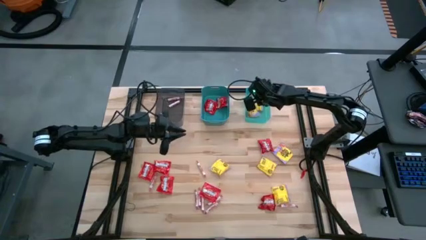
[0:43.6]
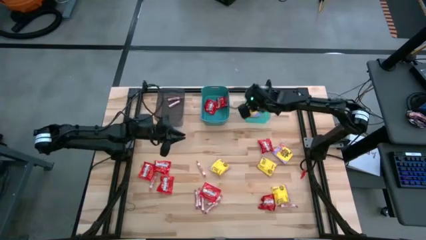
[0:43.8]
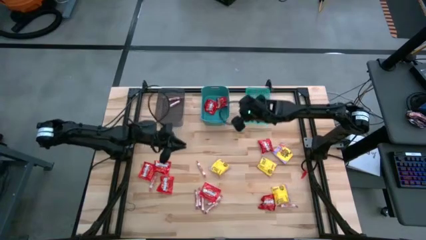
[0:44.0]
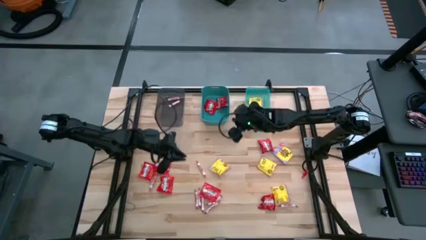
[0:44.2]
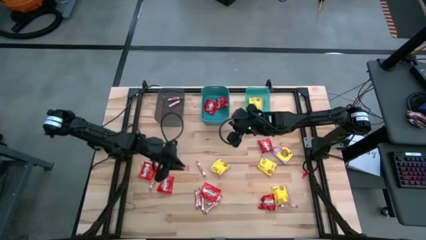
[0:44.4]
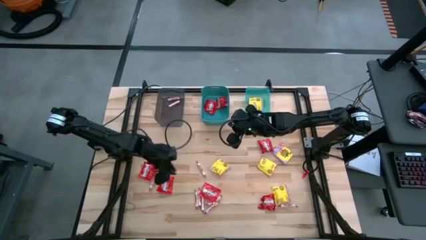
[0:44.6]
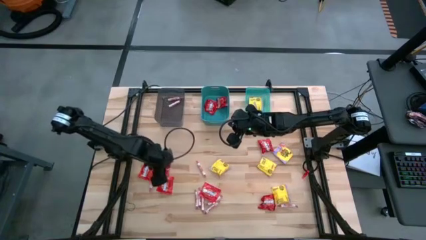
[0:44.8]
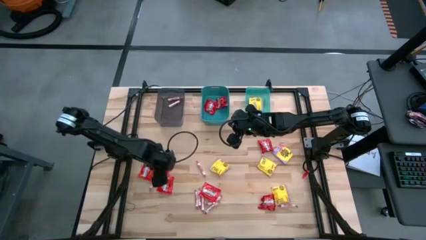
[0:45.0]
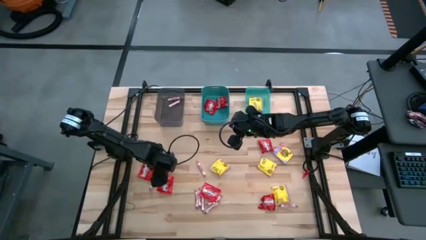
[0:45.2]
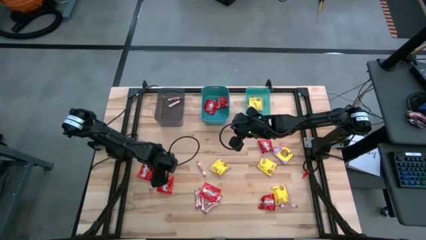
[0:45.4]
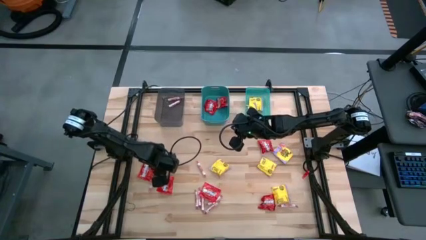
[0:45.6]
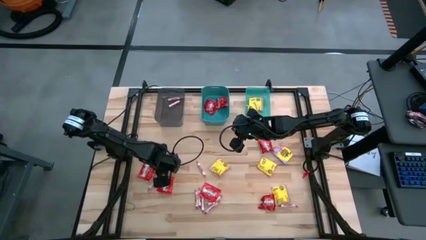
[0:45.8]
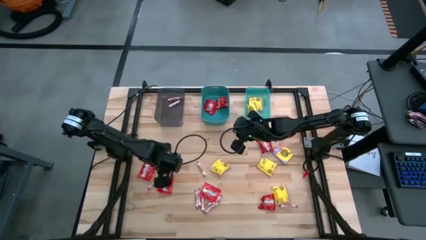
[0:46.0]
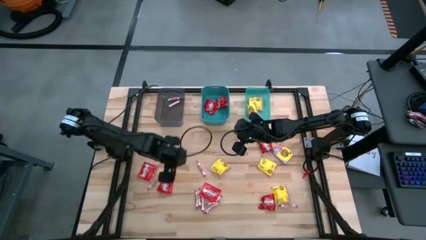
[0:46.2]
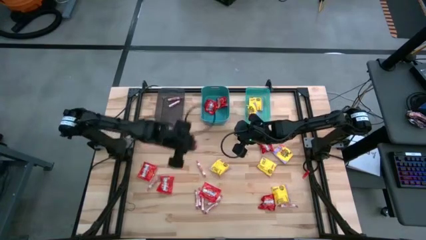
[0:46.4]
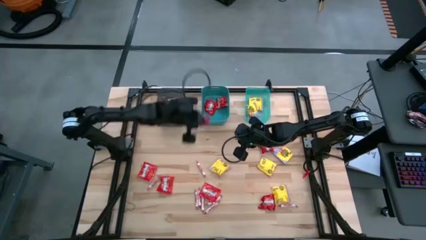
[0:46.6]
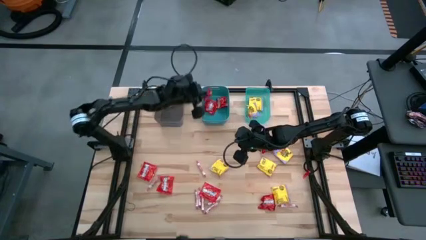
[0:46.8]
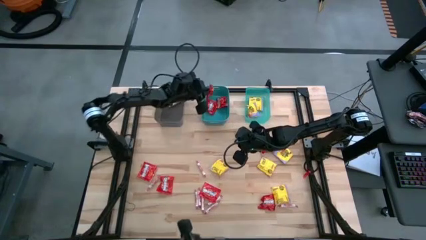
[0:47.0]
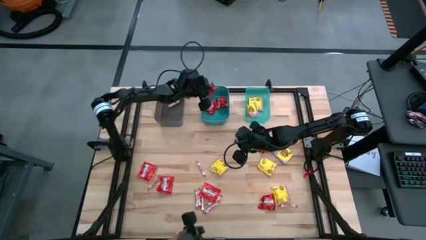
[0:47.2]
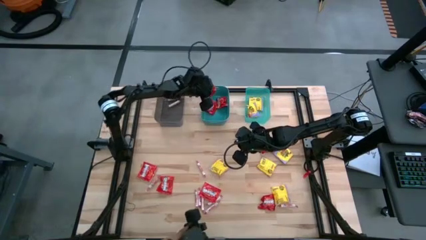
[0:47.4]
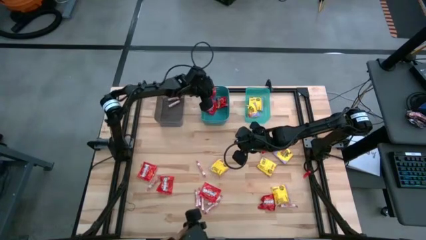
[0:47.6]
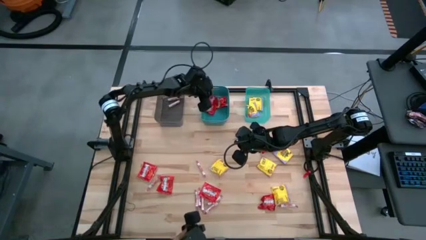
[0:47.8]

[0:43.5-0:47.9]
Task: Sort candy
Put the top left red candy on the dark green bin

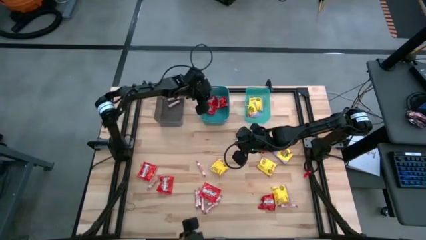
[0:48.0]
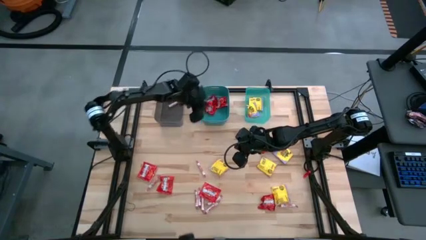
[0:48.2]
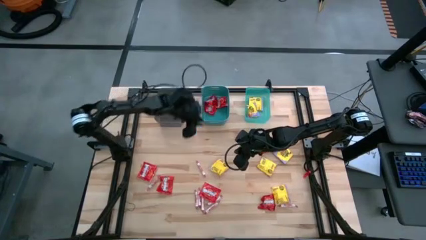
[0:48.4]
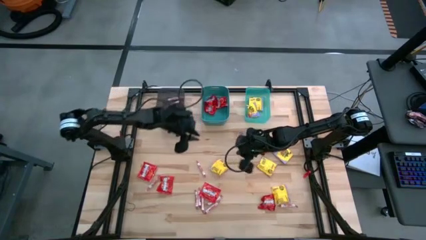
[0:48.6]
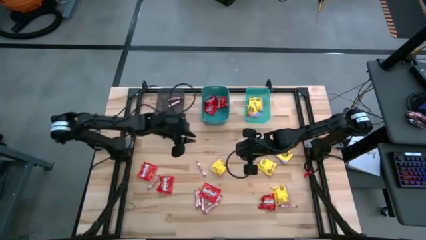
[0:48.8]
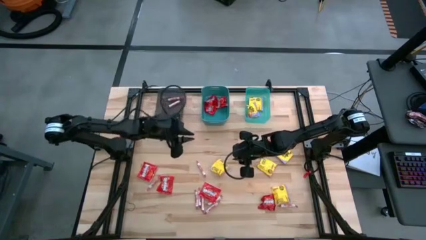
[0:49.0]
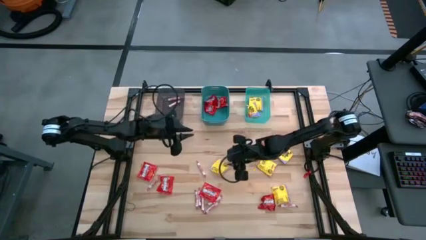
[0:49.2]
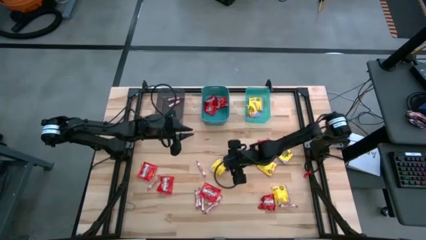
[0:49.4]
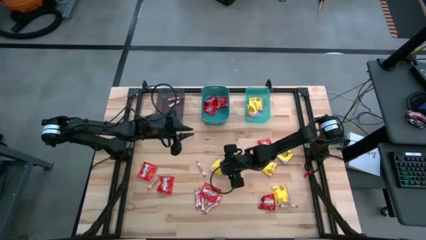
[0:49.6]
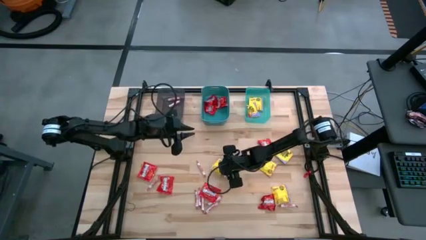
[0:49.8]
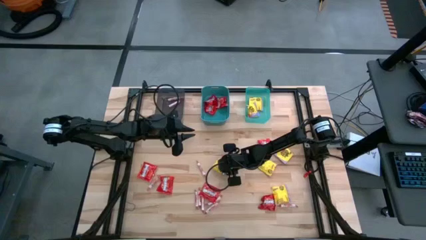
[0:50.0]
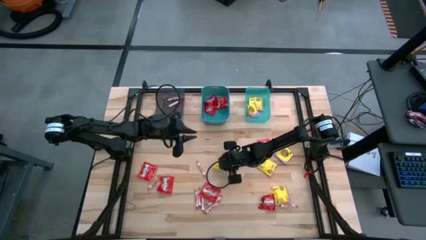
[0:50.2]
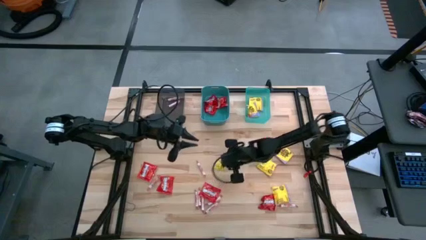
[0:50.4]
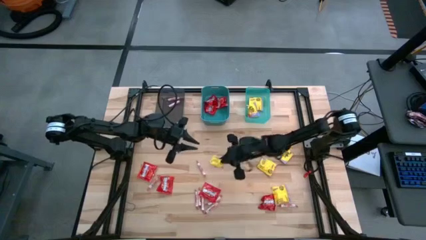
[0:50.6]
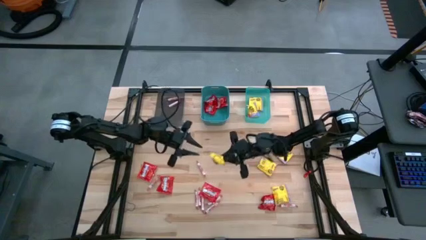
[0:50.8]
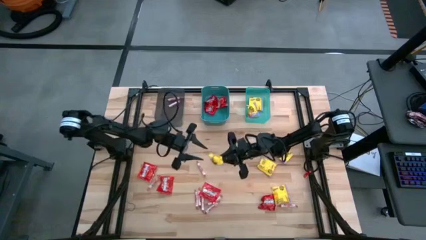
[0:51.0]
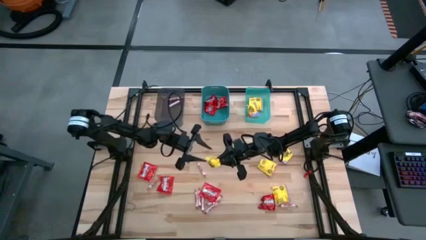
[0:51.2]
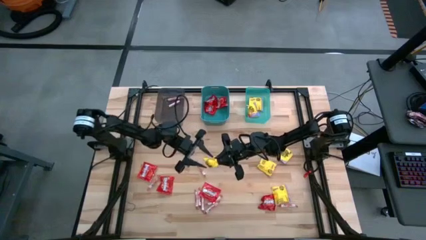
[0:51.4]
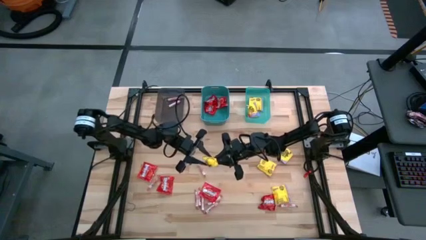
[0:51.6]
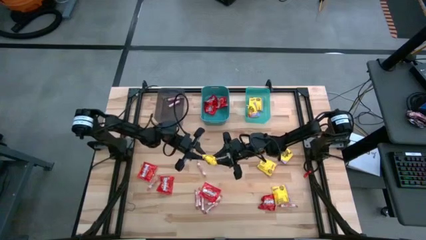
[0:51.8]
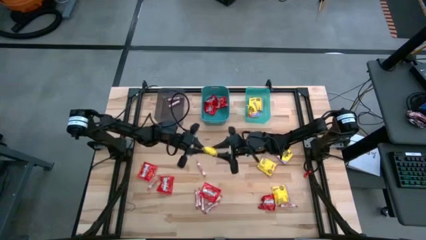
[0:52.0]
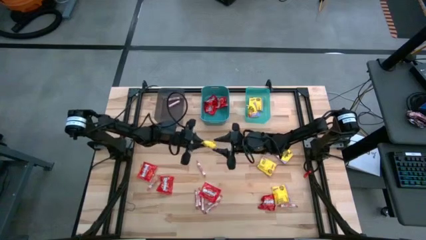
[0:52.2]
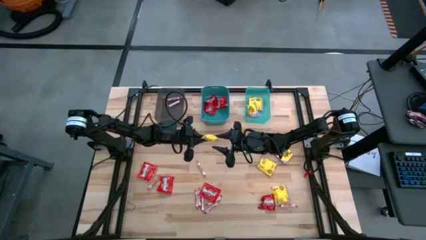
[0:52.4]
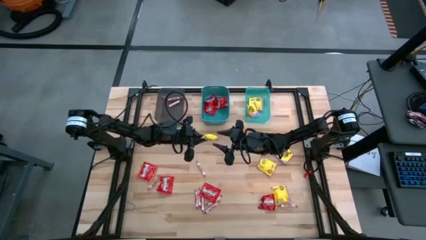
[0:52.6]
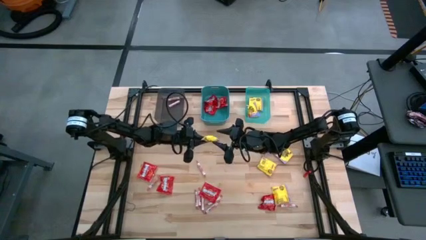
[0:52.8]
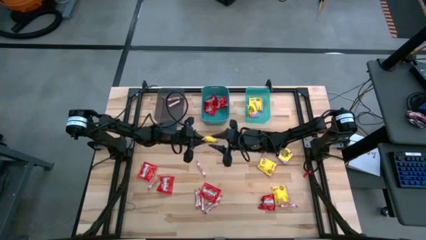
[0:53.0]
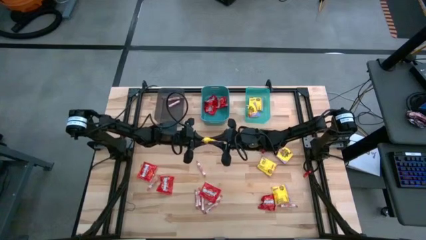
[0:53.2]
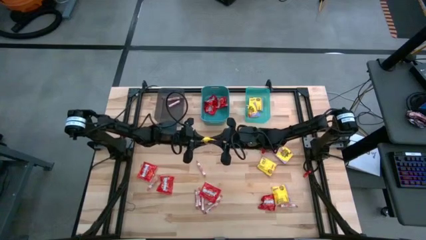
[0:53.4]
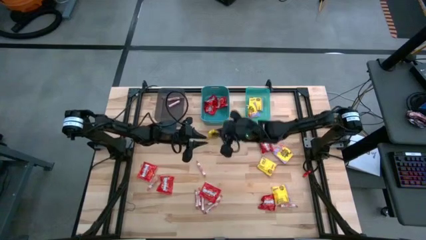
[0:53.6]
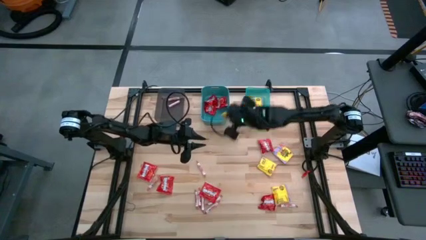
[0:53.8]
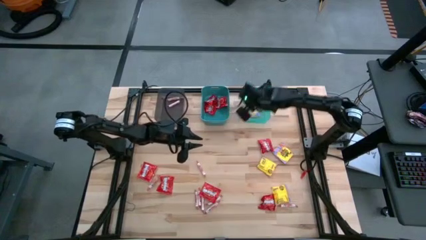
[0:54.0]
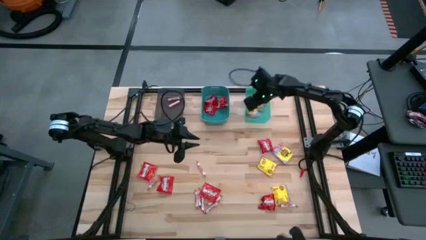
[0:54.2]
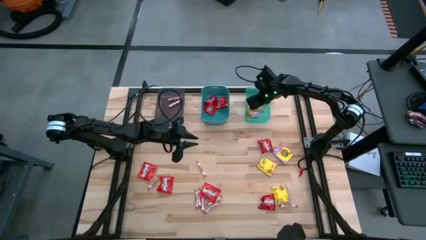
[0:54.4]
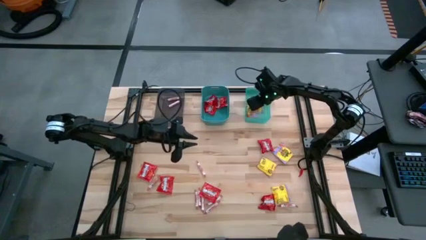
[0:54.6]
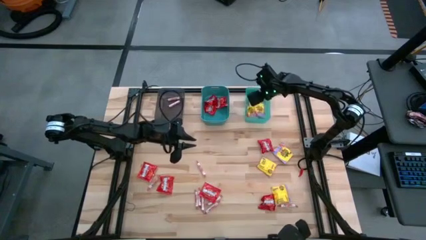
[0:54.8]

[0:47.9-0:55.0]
Put the yellow candy on the light green bin

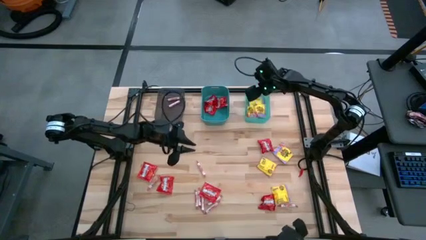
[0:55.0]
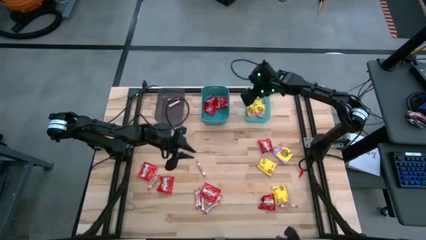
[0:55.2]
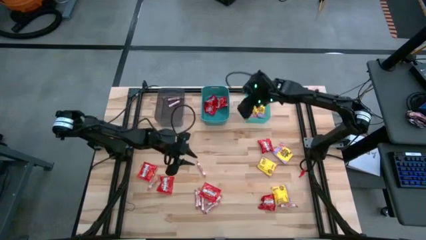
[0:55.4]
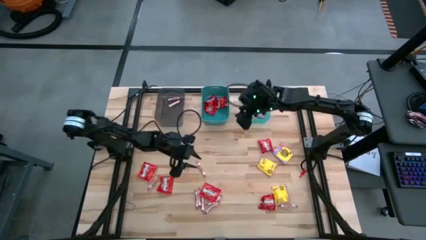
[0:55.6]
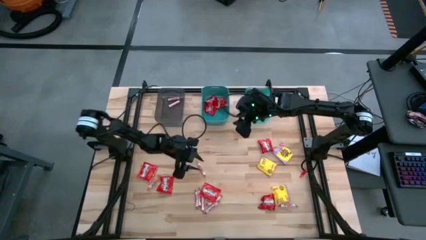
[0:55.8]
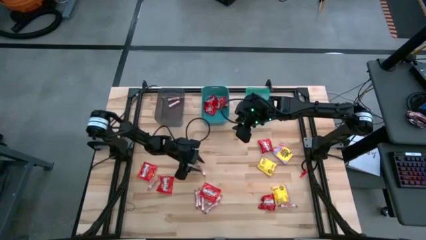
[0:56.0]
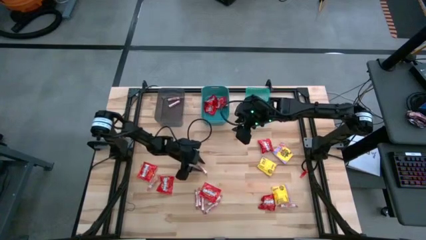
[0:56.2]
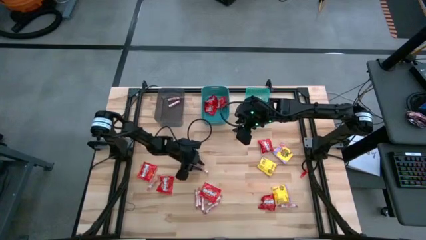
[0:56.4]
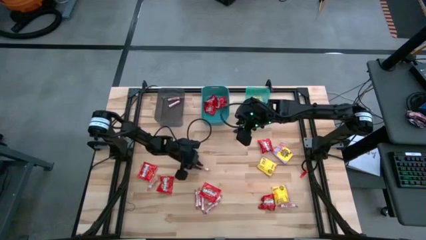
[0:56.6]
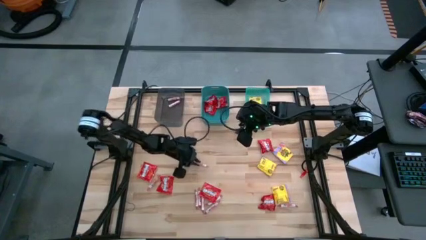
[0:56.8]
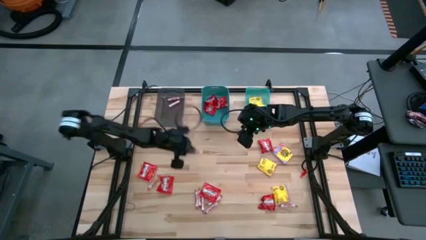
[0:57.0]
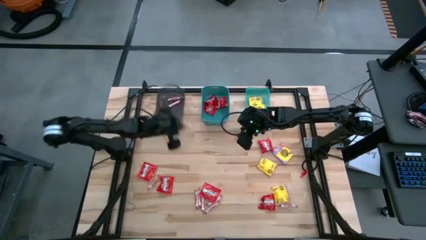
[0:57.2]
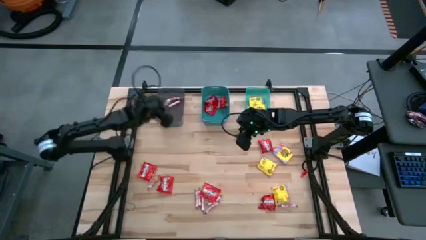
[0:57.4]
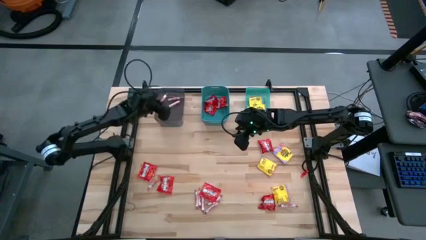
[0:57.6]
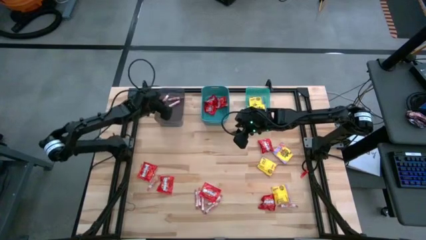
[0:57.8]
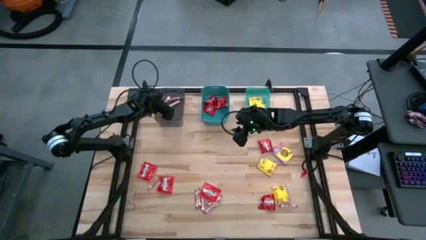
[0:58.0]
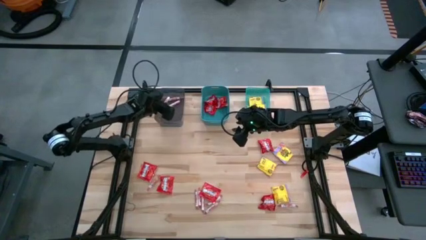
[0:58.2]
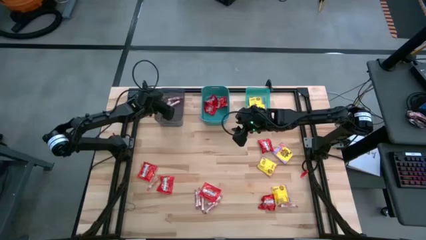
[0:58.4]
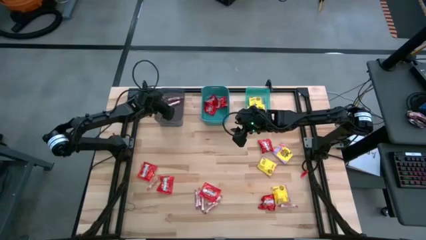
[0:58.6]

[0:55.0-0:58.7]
Put the white candy on the black bin

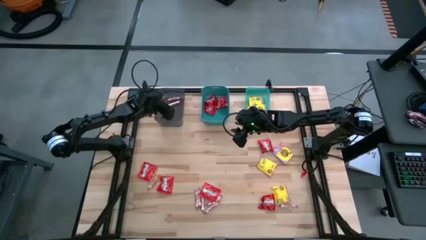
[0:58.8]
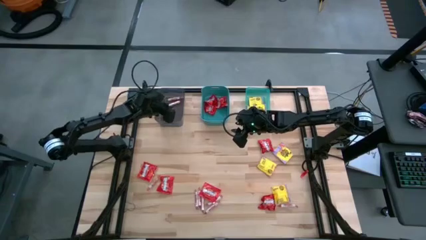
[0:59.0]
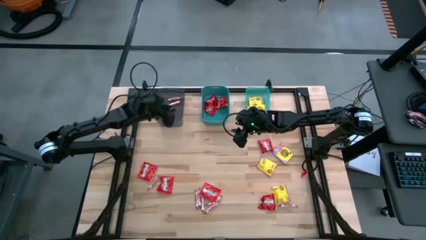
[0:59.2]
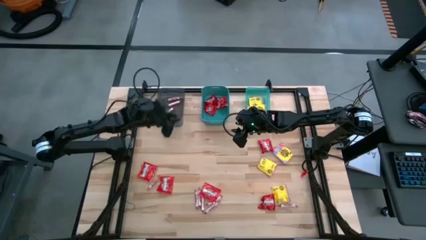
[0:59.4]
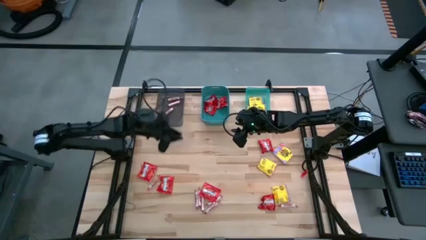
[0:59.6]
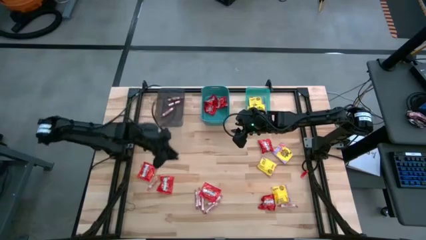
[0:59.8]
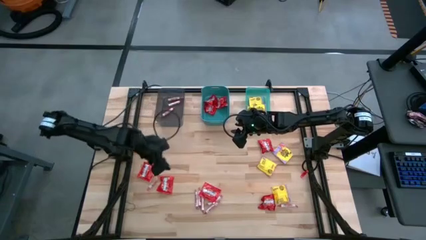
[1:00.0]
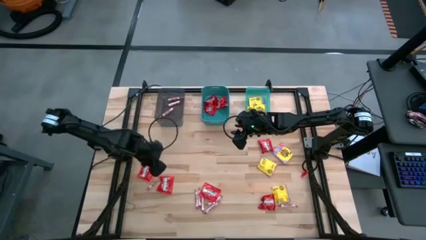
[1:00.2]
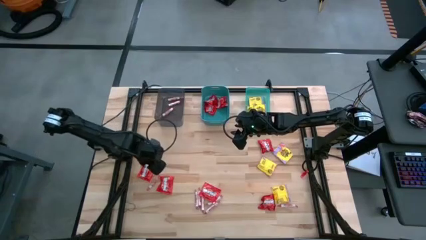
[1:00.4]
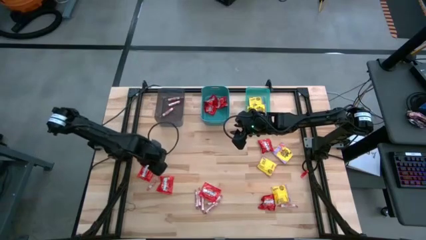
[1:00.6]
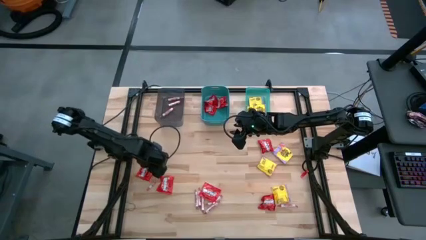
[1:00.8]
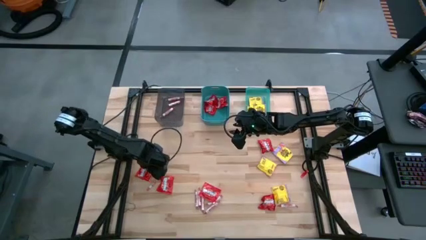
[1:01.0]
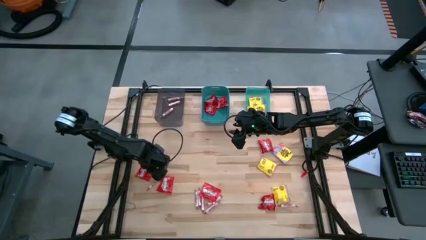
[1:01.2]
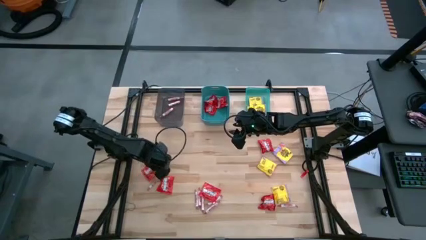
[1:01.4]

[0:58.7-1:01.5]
Put the middle left red candy on the dark green bin
